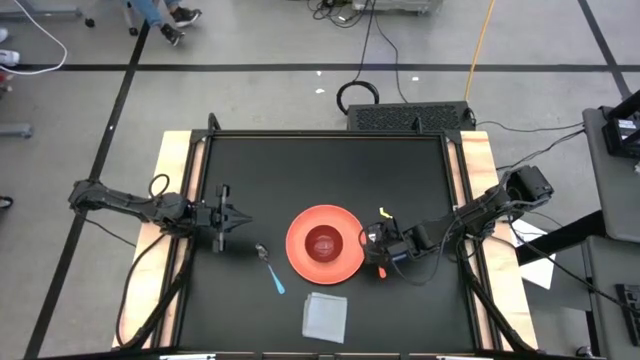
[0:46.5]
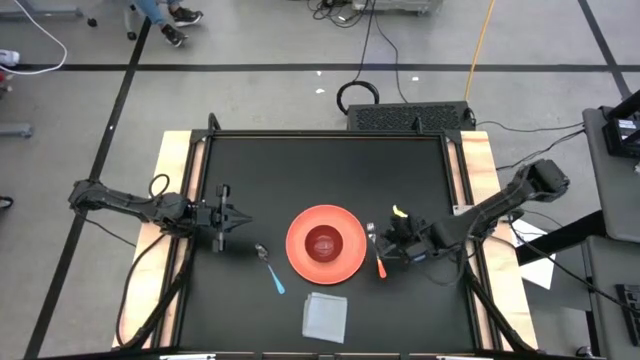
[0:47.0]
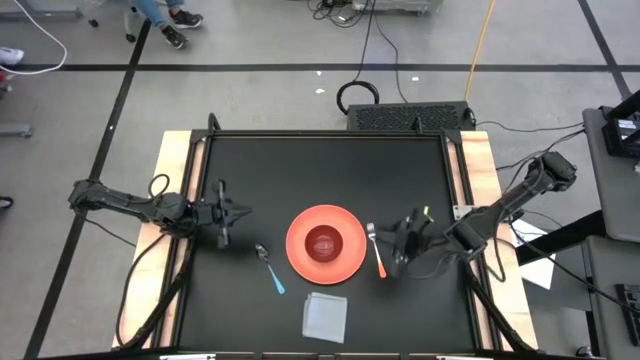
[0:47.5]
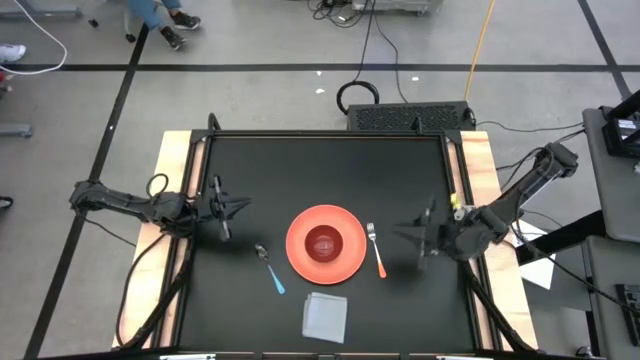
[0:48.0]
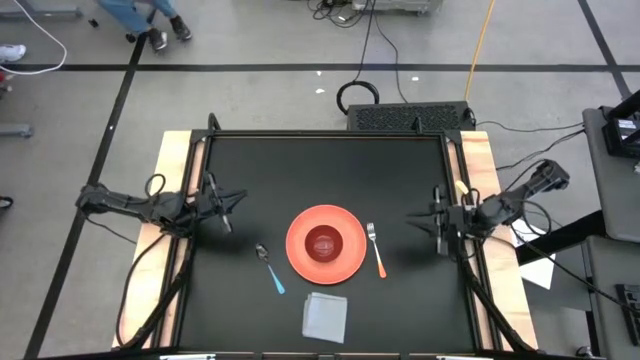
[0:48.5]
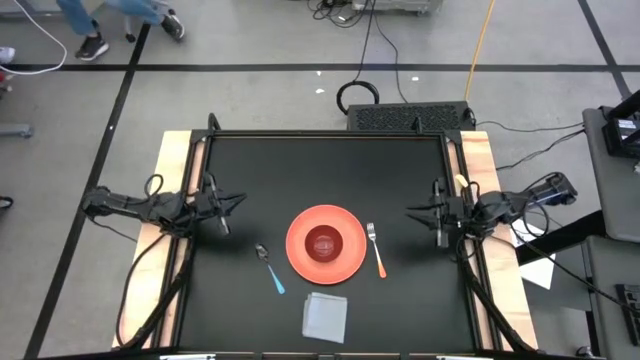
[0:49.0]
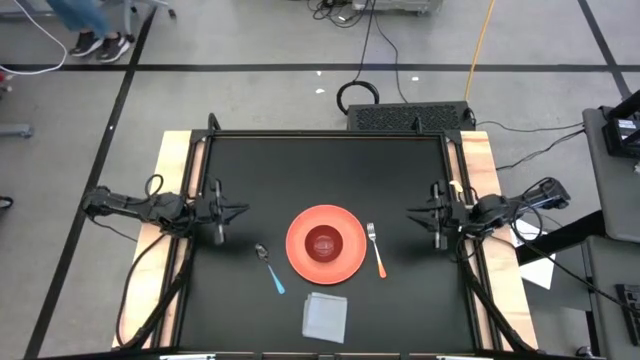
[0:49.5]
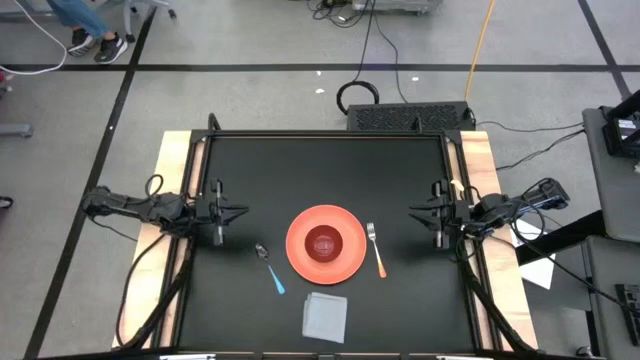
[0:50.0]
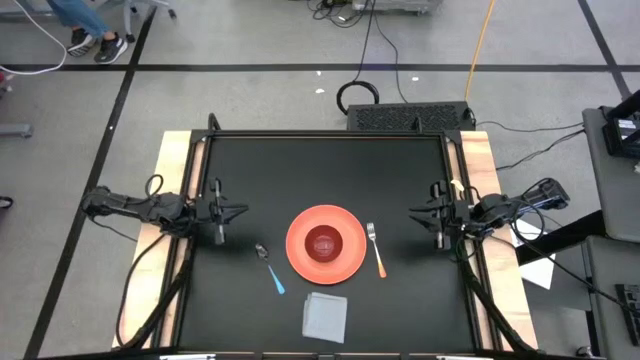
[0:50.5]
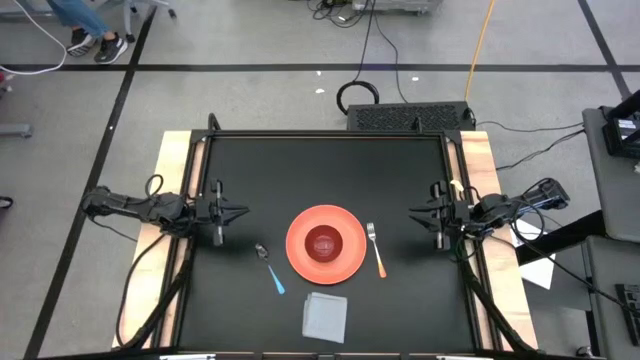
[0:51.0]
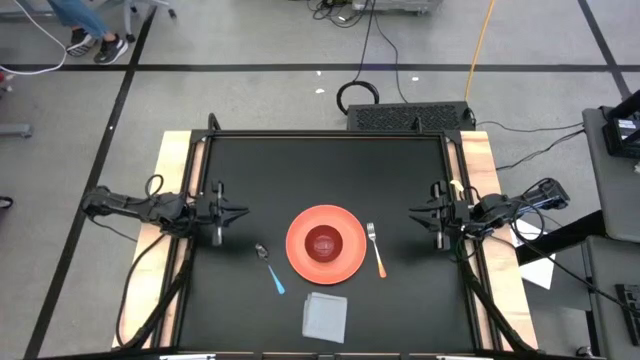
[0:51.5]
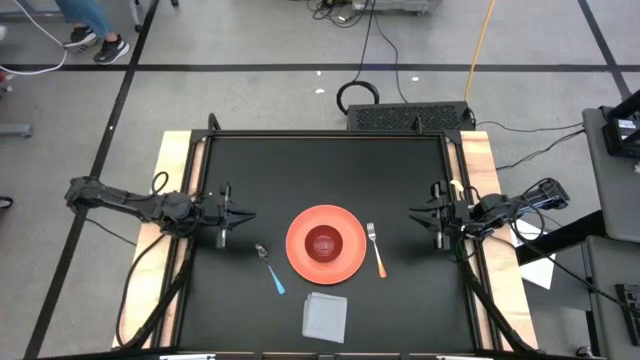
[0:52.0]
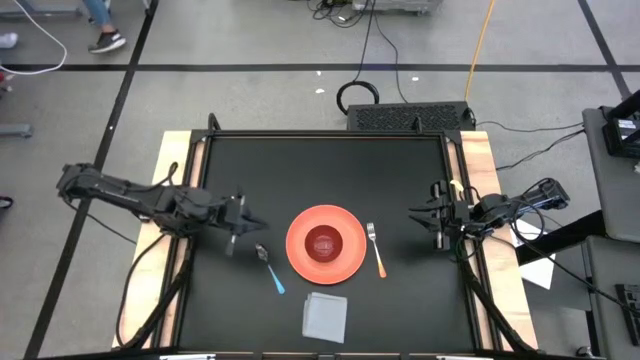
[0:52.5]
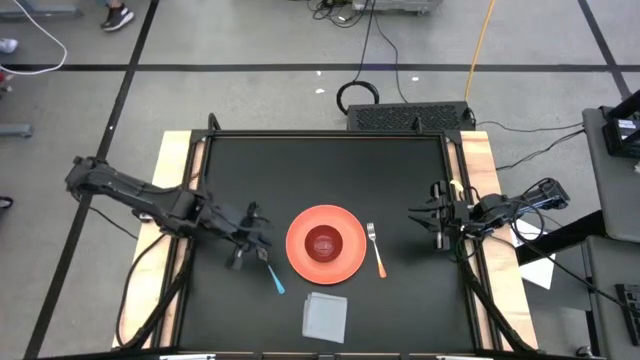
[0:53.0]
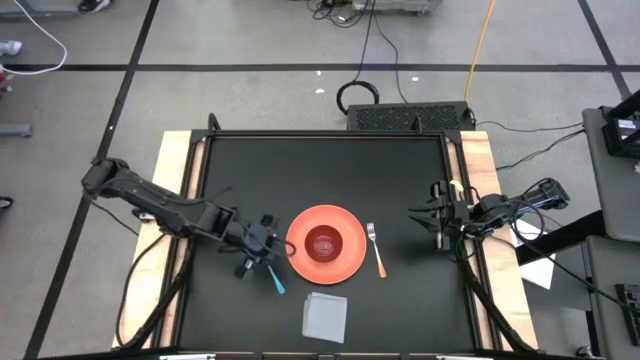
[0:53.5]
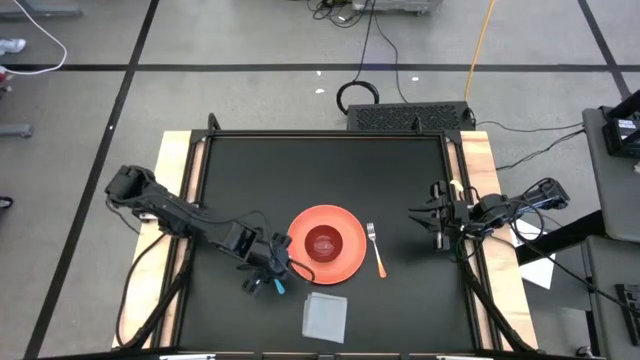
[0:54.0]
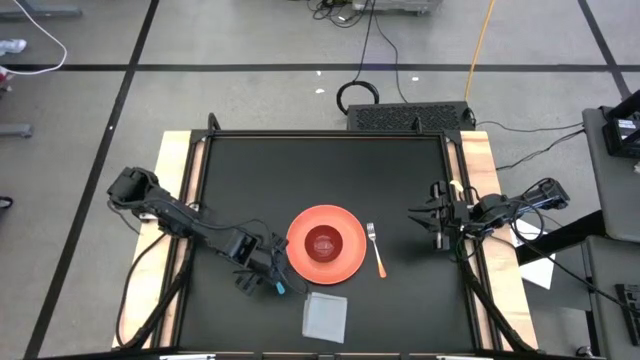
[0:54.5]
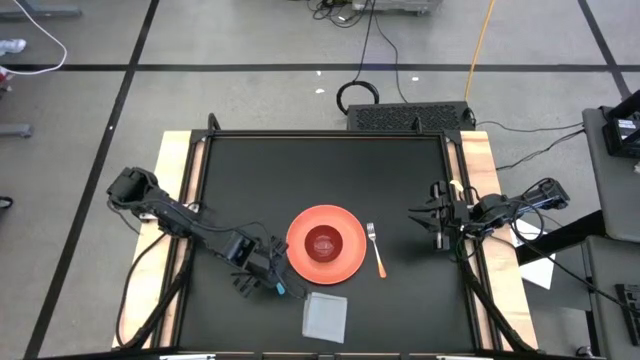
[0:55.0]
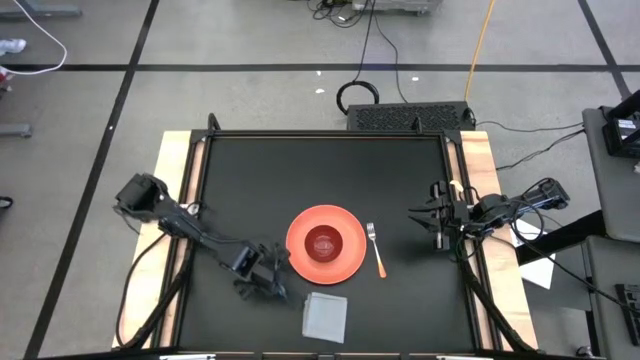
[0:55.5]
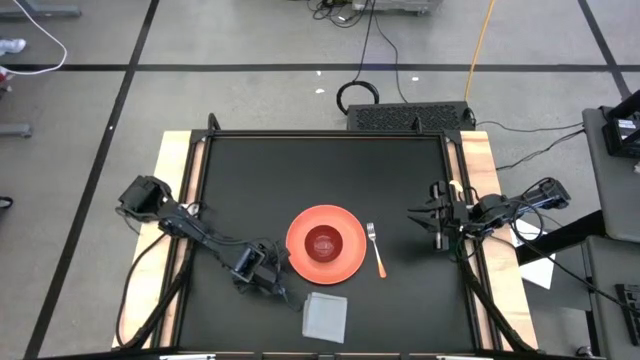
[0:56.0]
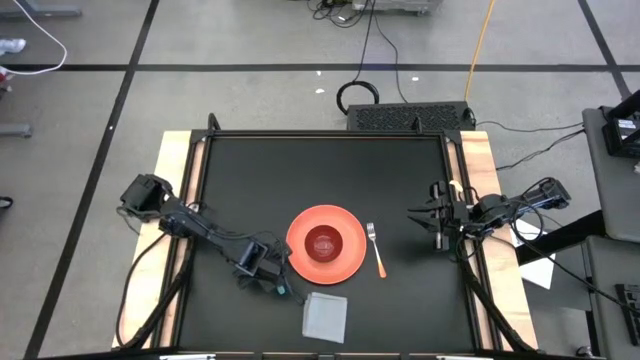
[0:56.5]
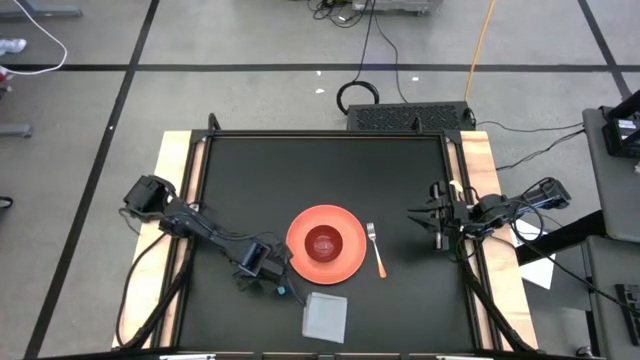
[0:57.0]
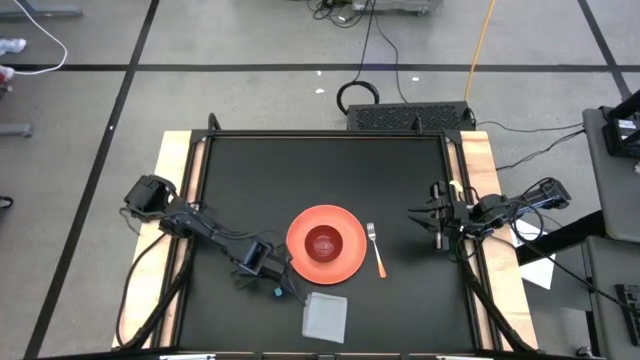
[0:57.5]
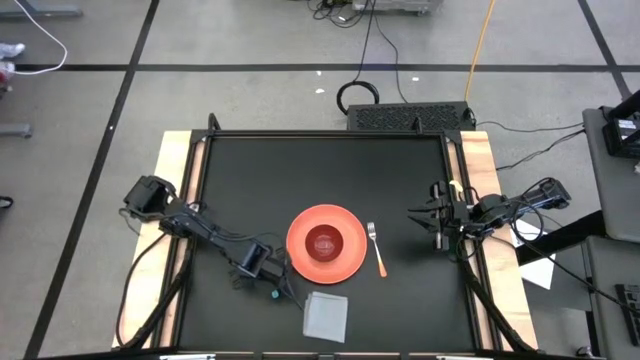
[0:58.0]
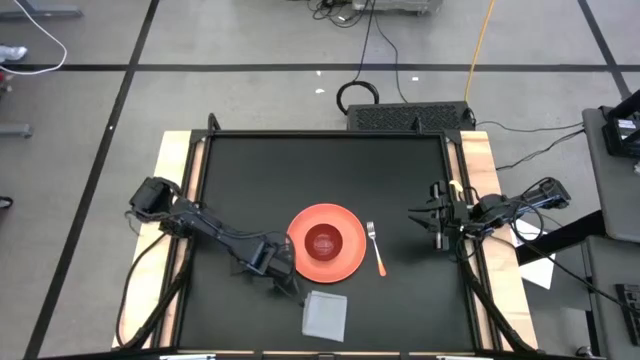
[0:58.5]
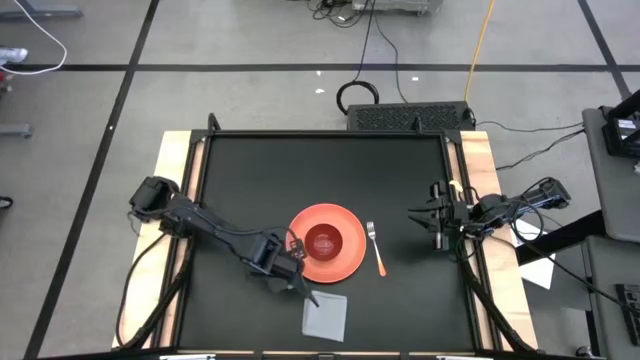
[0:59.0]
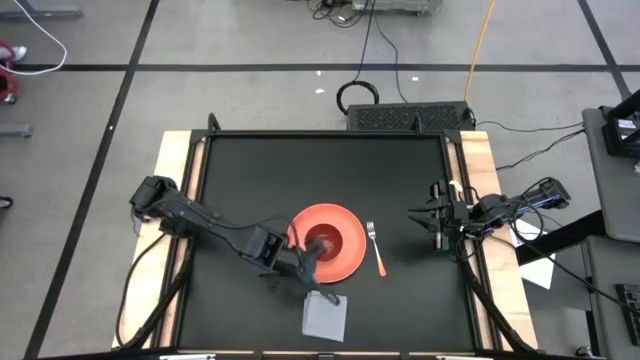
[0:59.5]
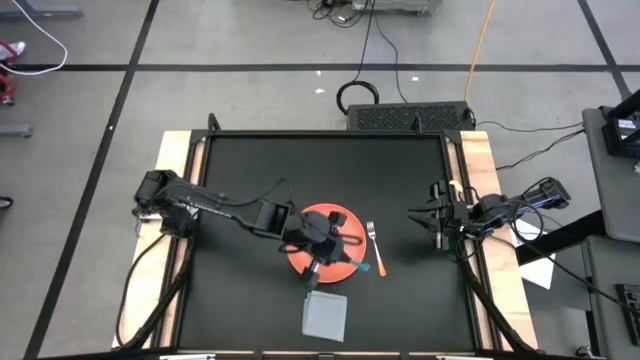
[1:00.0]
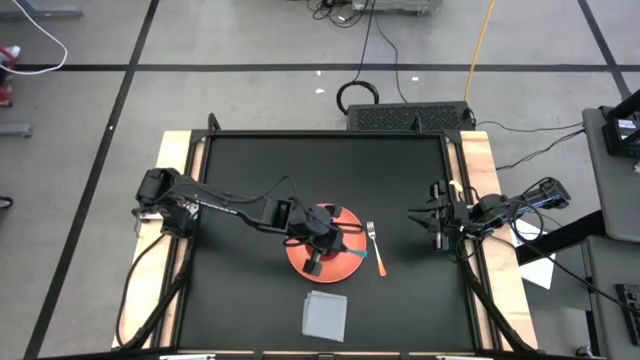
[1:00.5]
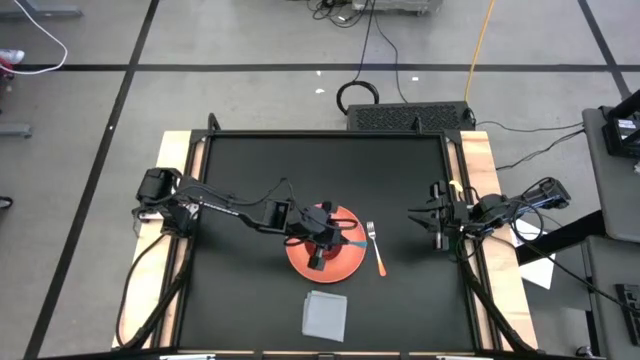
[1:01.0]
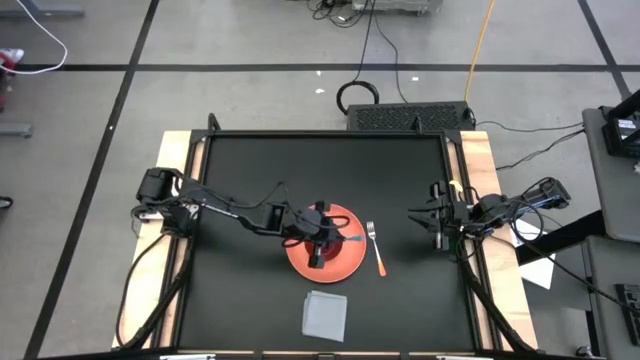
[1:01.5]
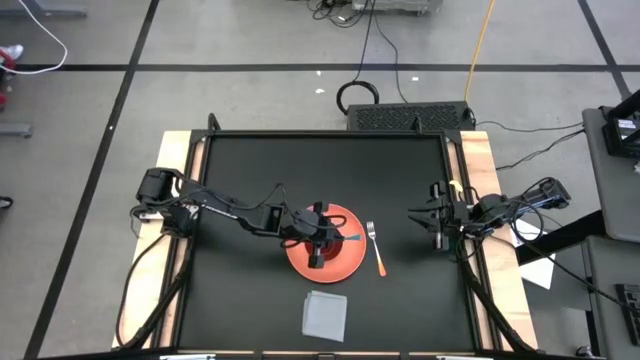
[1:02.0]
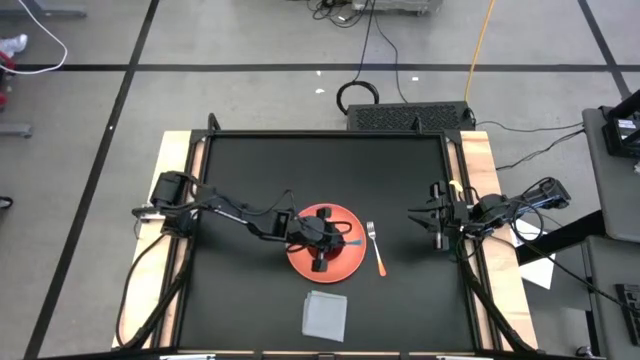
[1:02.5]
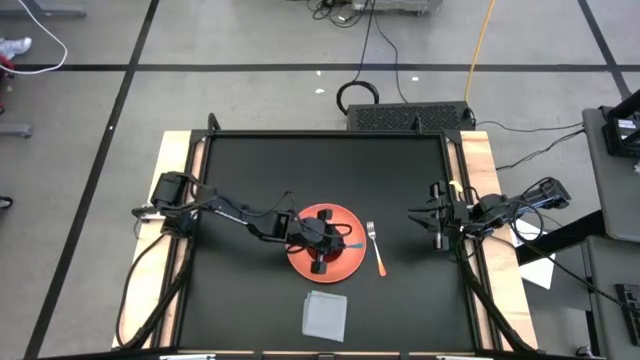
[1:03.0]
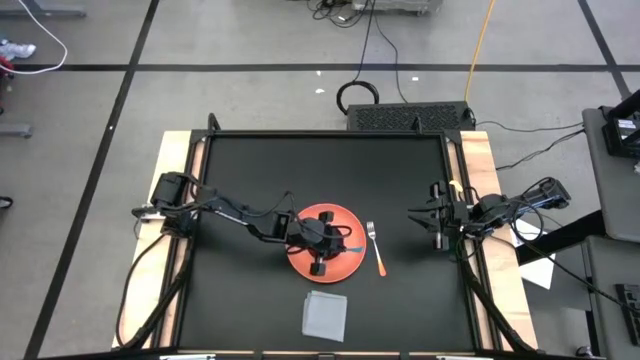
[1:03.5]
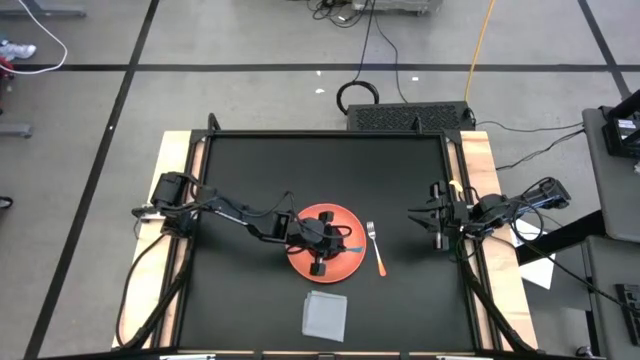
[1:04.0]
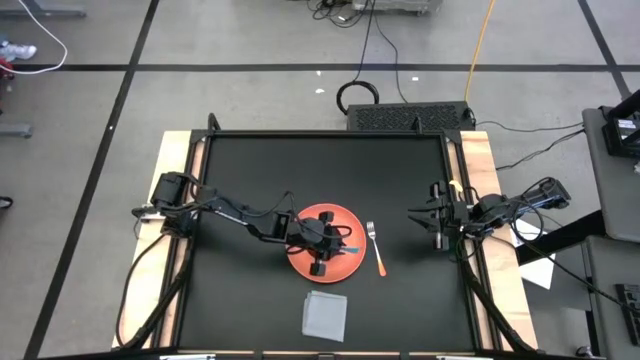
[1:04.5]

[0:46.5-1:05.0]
Task: Set table place
Put the blue spoon into the brown bowl

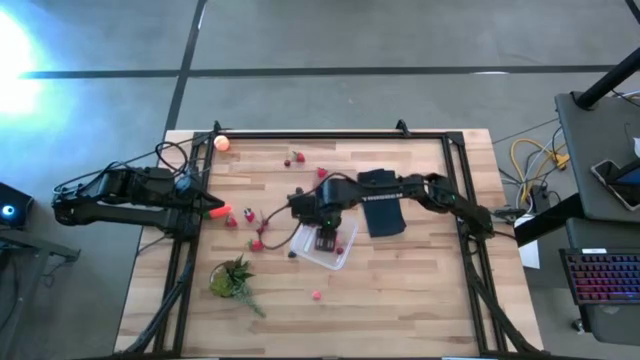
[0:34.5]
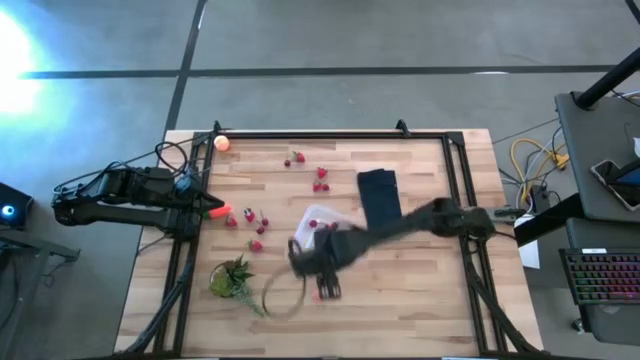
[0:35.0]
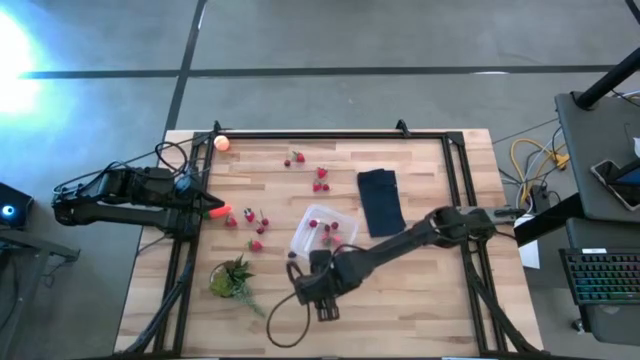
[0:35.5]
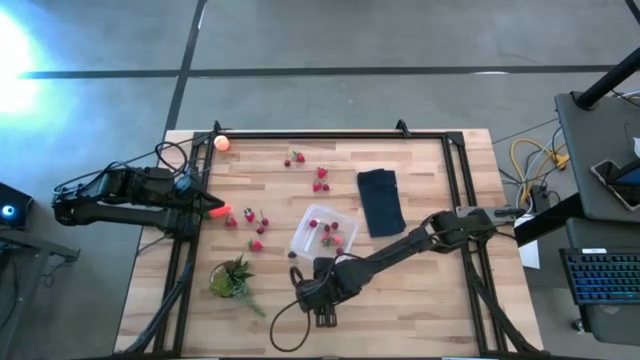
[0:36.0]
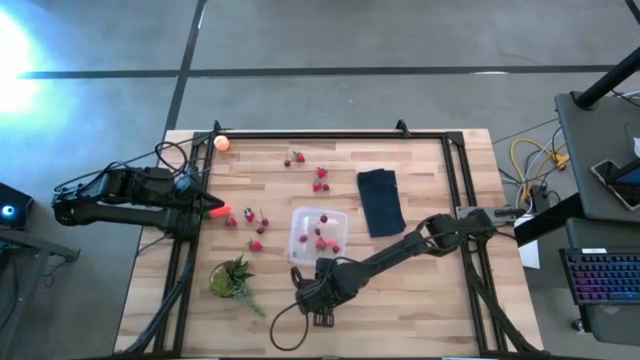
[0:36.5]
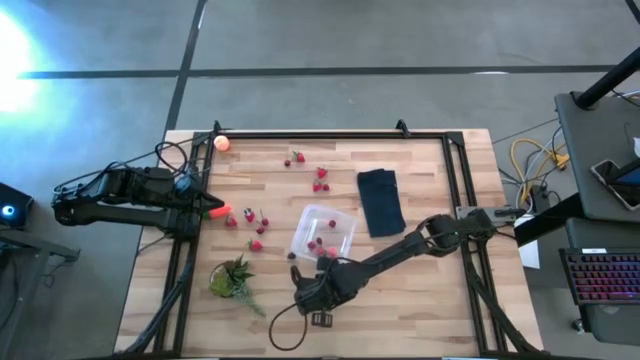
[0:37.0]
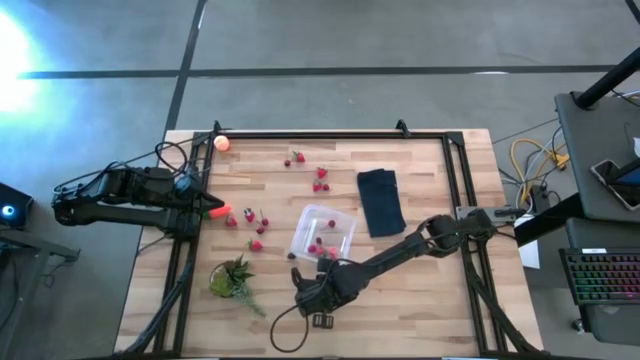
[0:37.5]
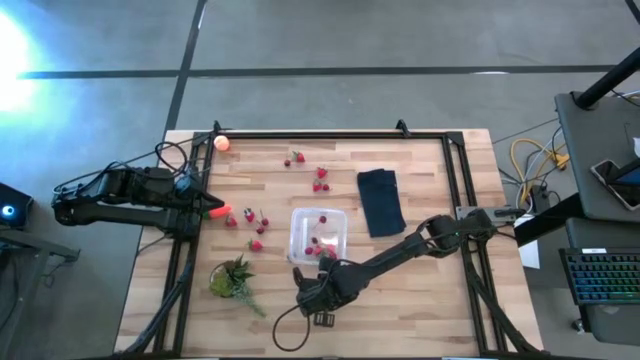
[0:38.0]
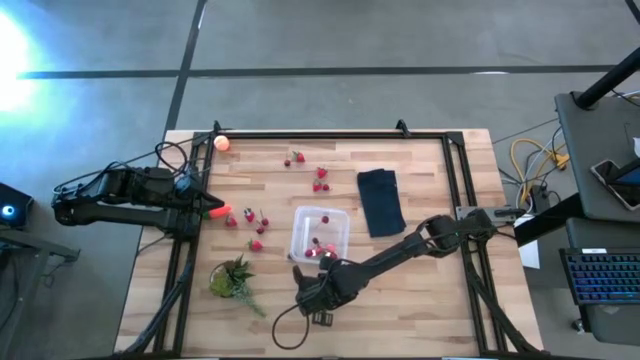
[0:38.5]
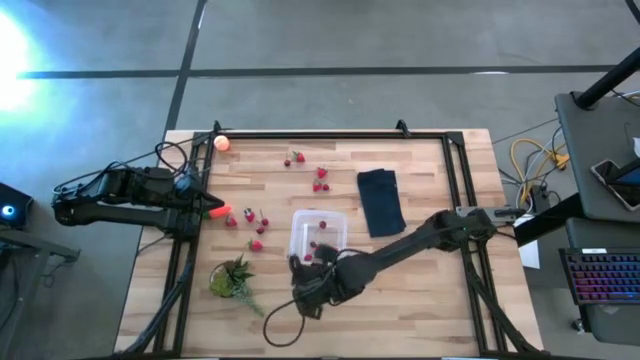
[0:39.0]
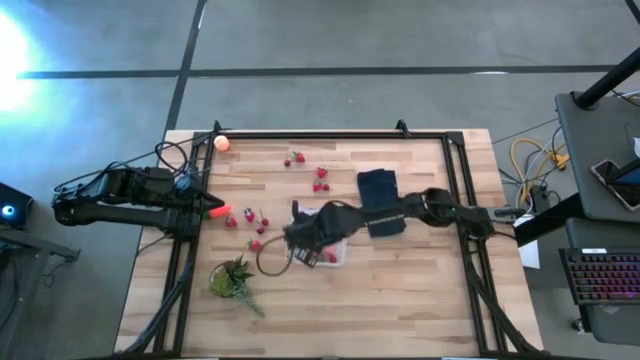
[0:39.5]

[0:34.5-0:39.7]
Task: Pick and placing Produce into tupperware
Put the pink peach into the transparent bin
